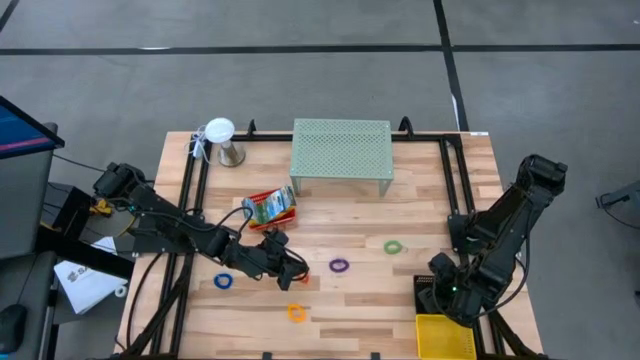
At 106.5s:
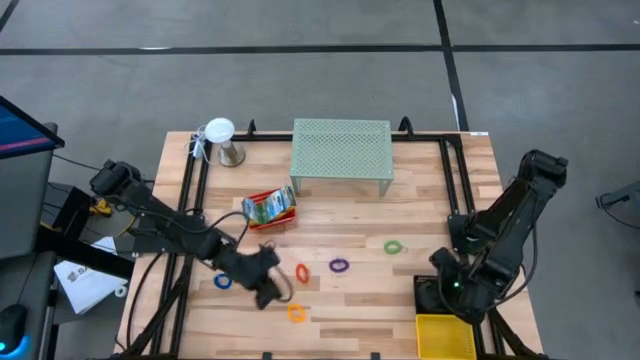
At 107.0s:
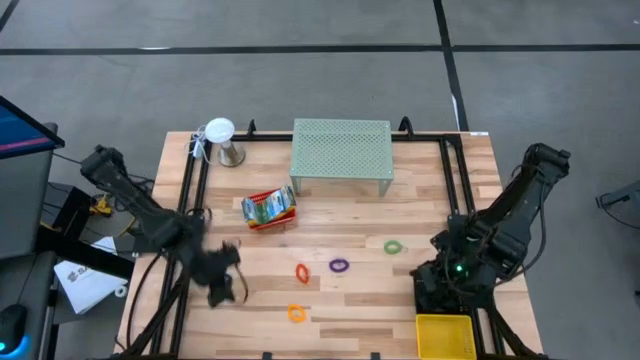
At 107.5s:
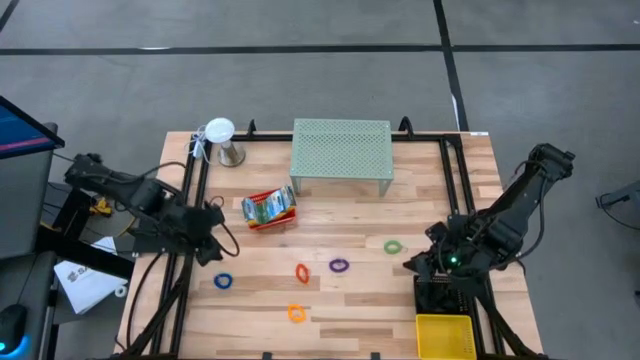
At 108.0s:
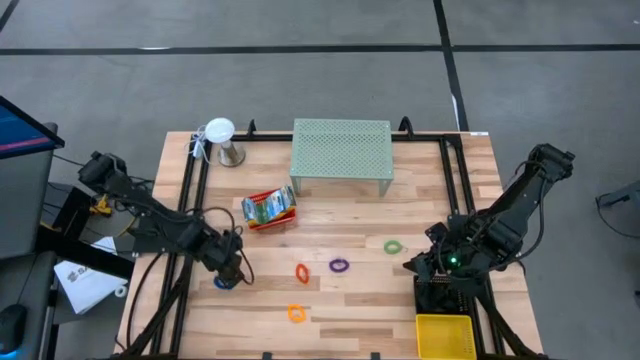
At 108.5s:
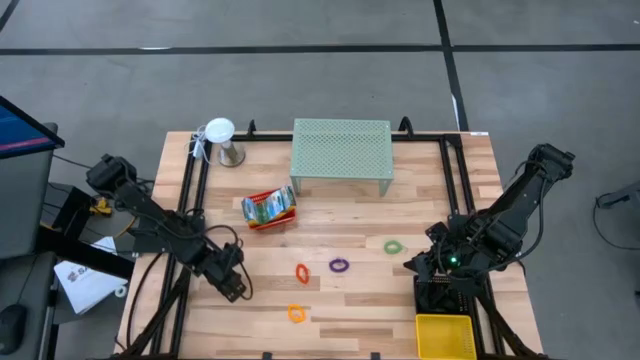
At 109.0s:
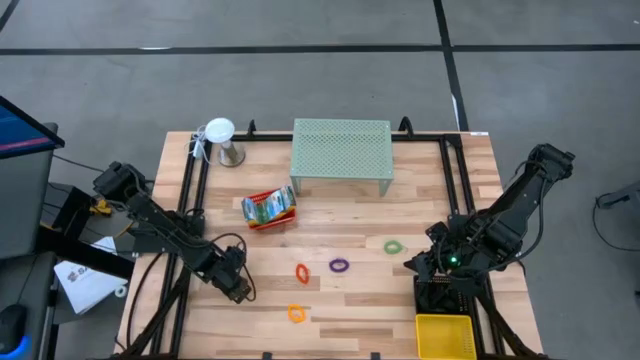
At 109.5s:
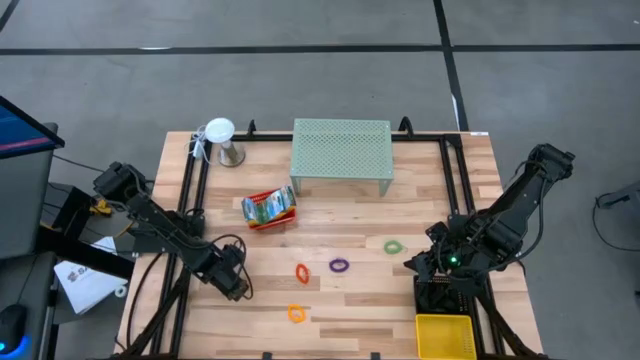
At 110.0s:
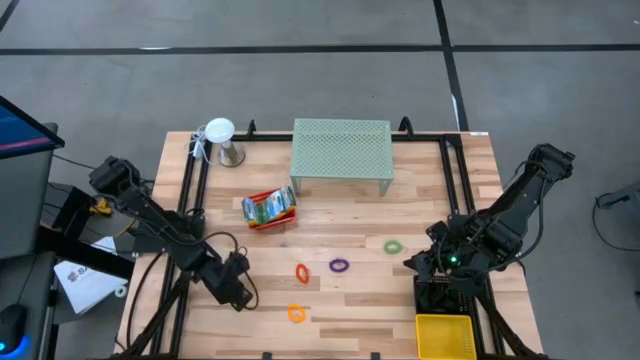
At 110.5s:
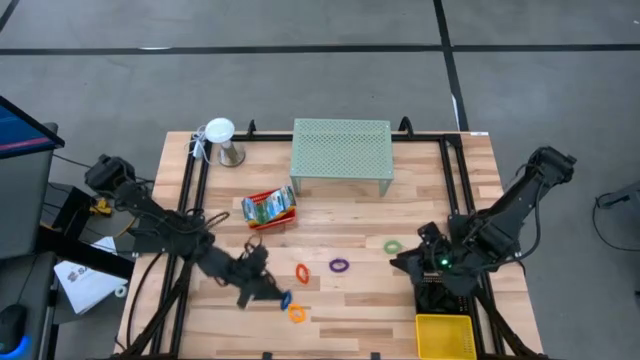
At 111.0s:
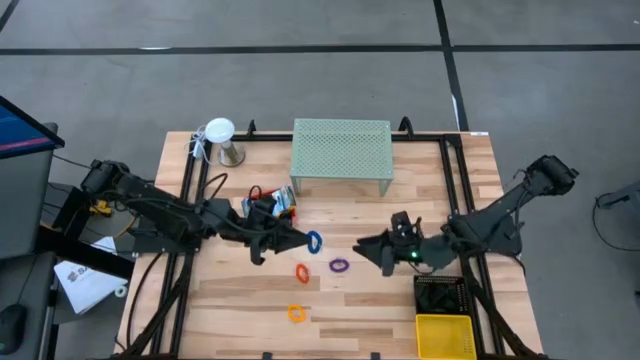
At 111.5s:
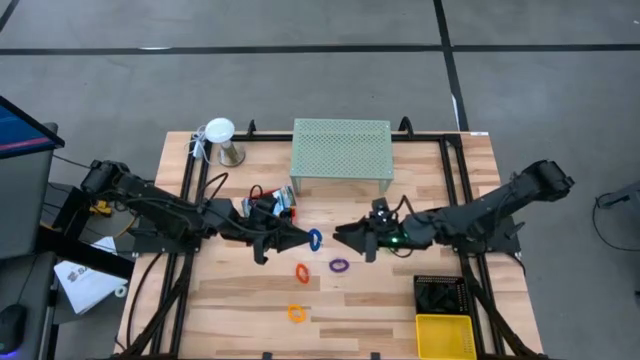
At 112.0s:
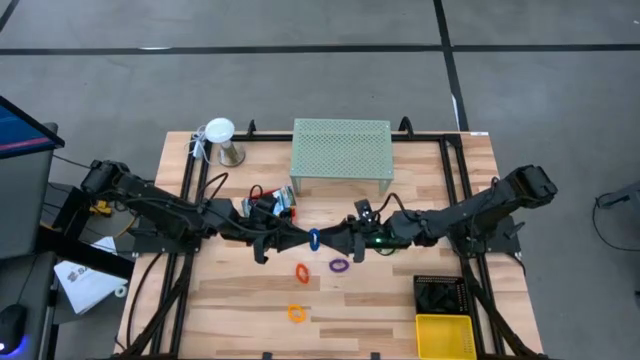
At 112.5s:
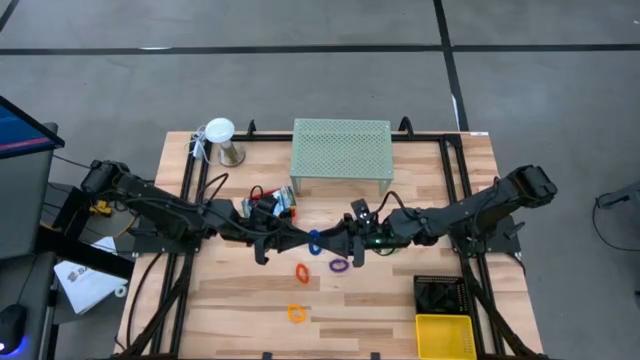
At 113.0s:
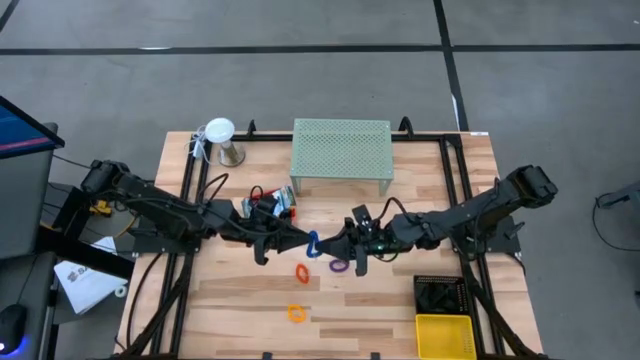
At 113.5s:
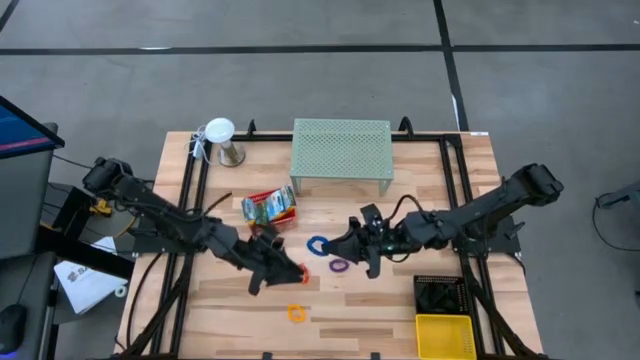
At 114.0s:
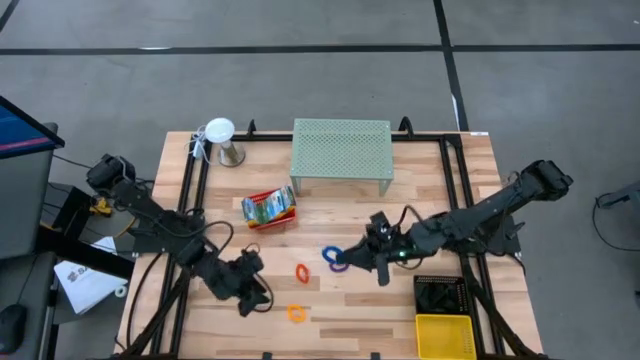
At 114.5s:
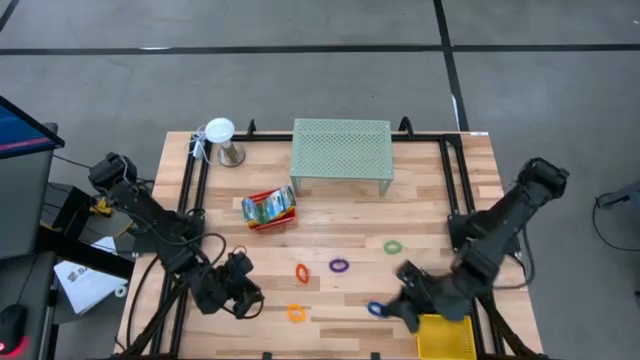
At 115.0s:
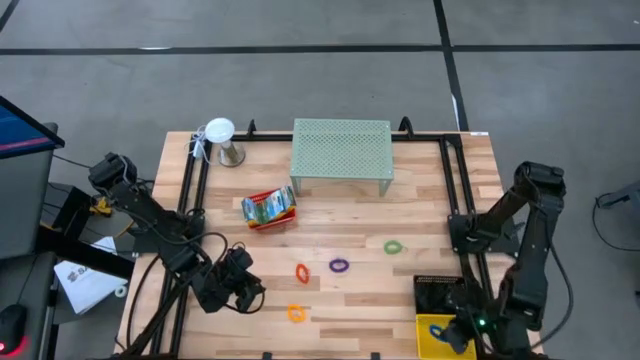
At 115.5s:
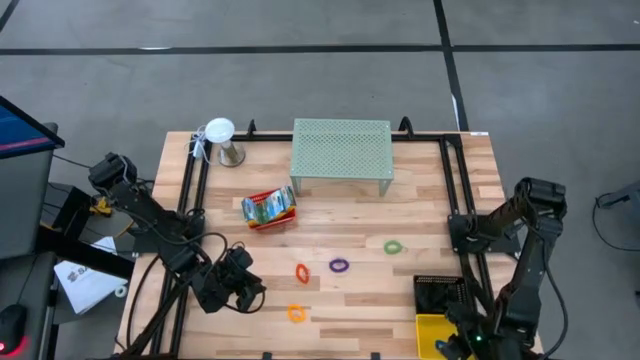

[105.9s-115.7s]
Task: Pick & Place Office Desk Supplies
Put the blue spring keychain into the yellow bin

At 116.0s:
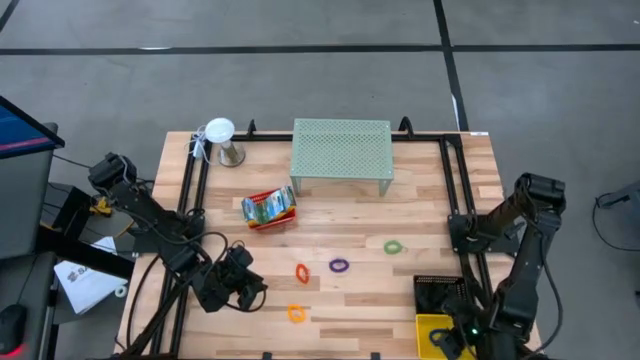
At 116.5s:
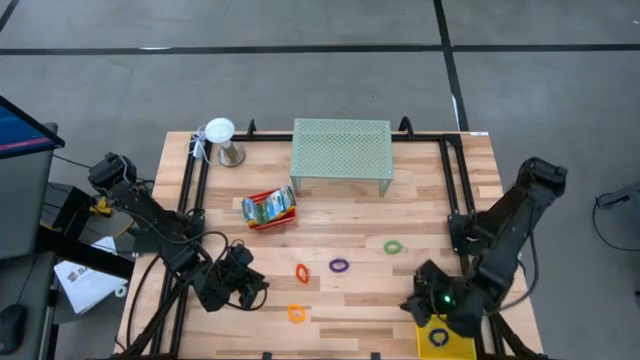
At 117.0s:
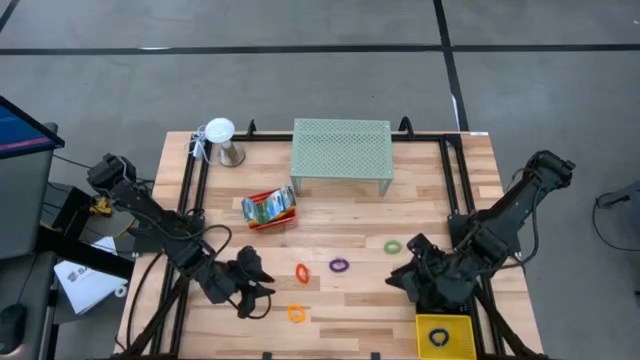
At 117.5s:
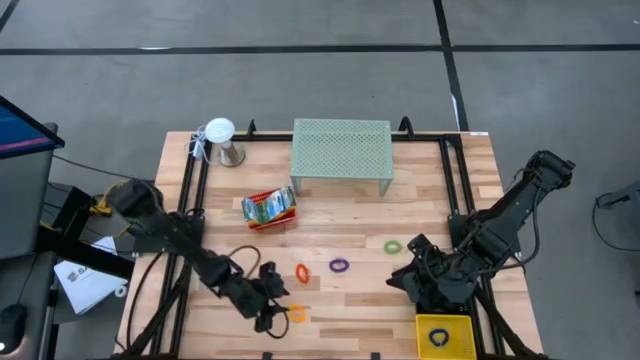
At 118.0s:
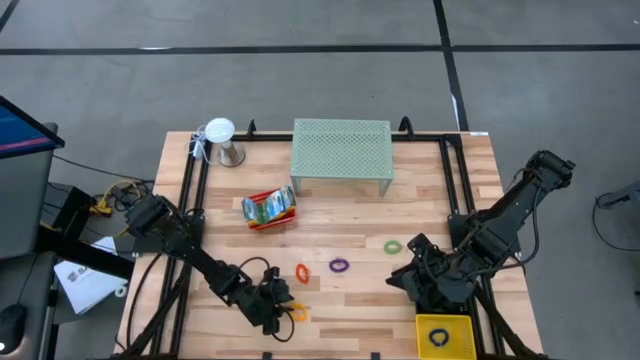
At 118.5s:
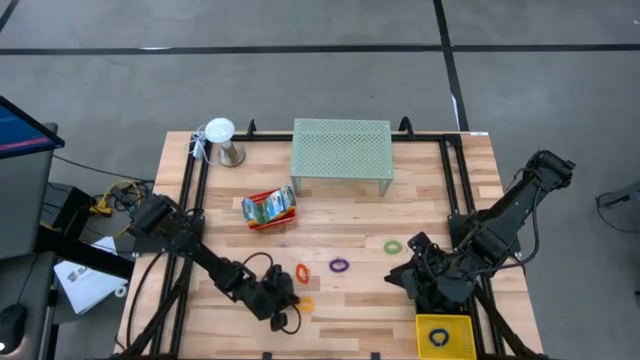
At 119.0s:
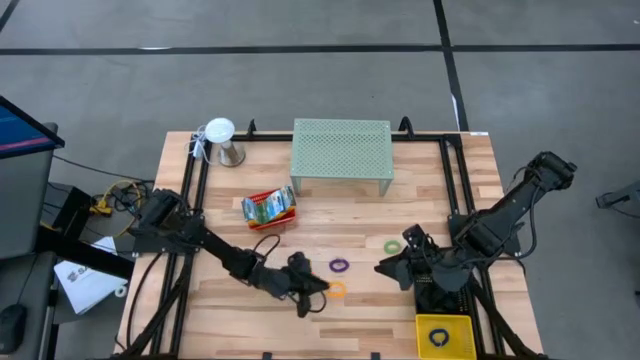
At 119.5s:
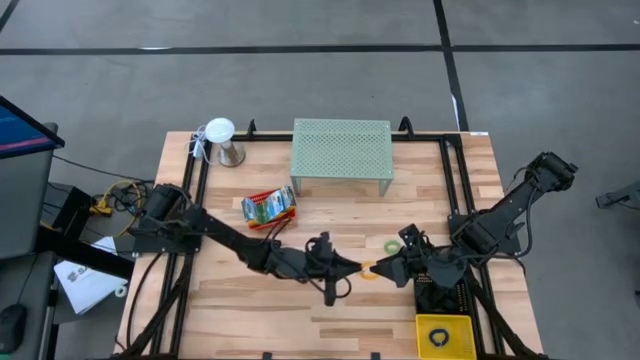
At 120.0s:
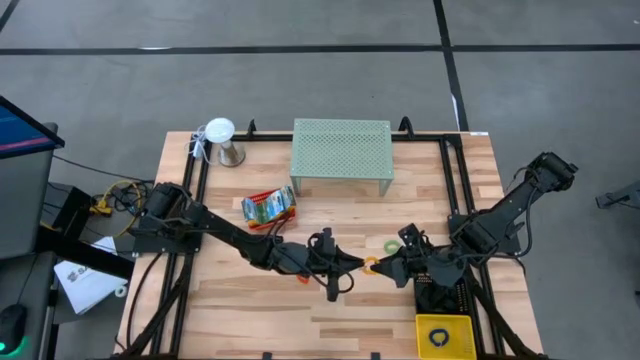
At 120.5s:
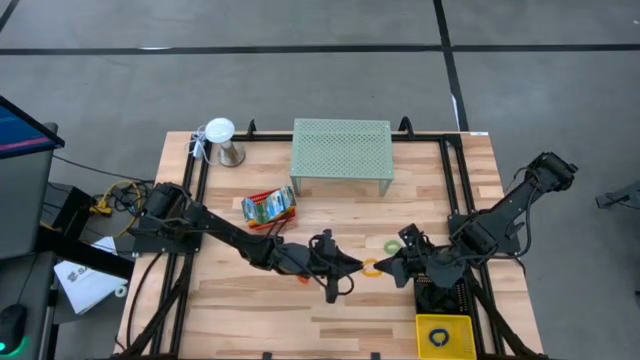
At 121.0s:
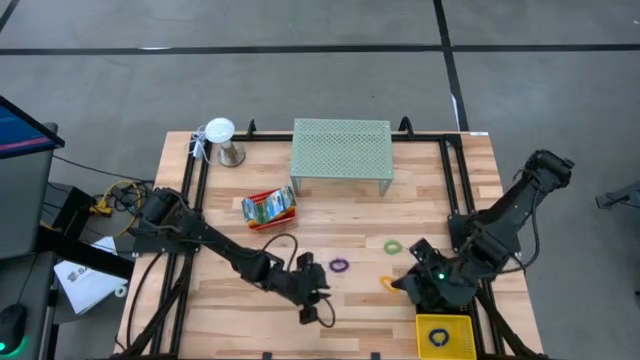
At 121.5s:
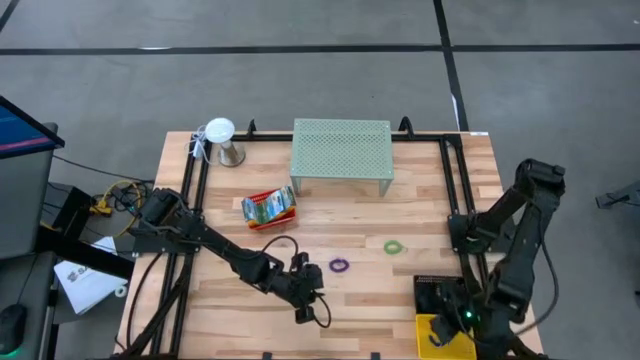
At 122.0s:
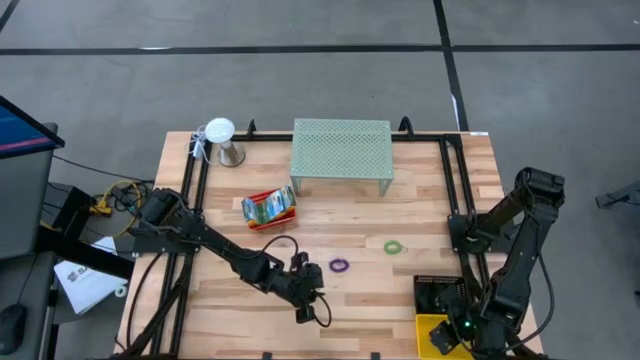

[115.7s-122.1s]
Put the yellow spring keychain into the yellow bin

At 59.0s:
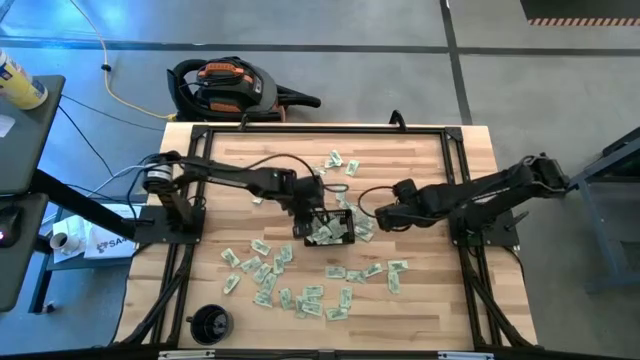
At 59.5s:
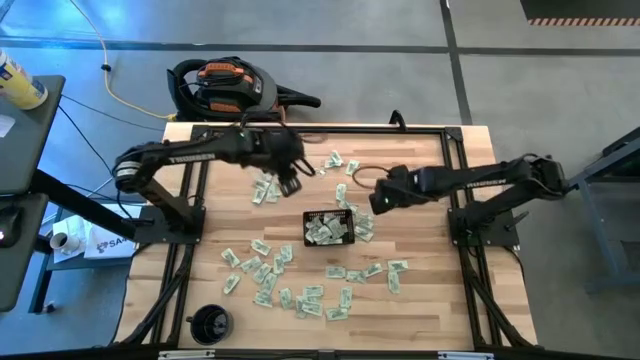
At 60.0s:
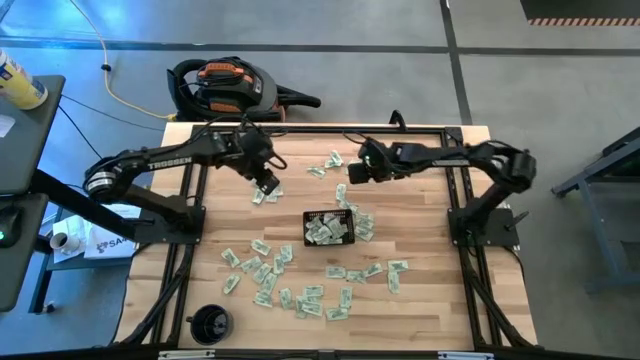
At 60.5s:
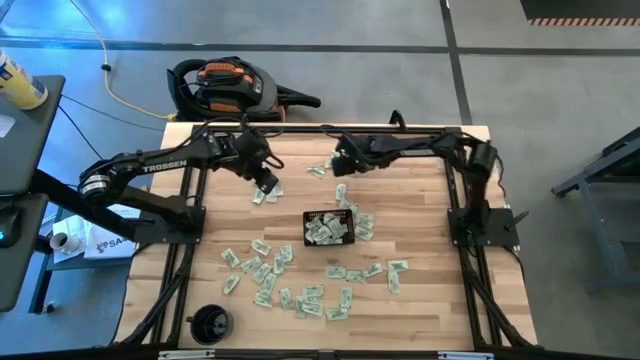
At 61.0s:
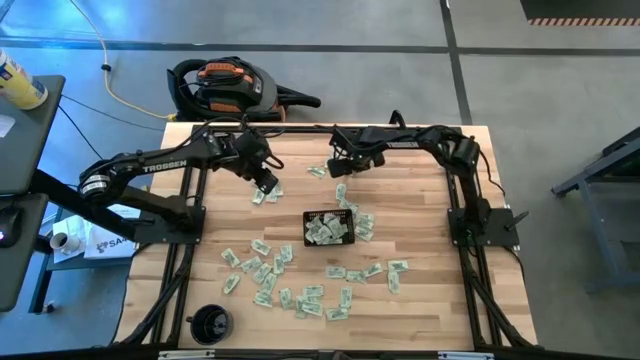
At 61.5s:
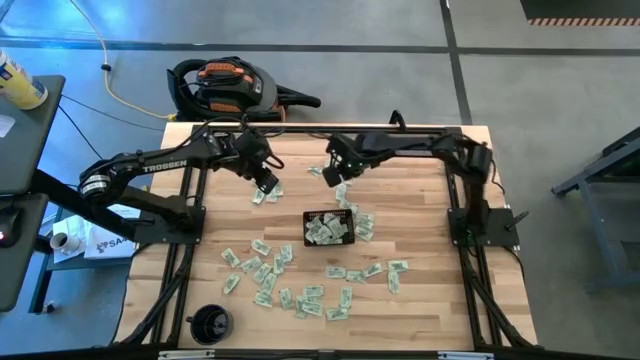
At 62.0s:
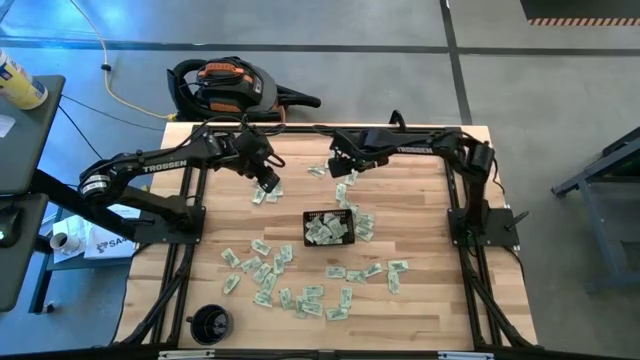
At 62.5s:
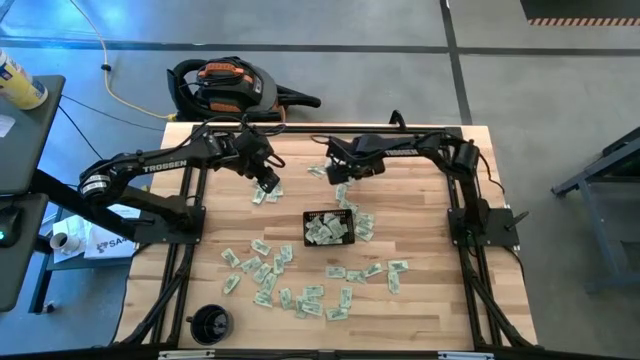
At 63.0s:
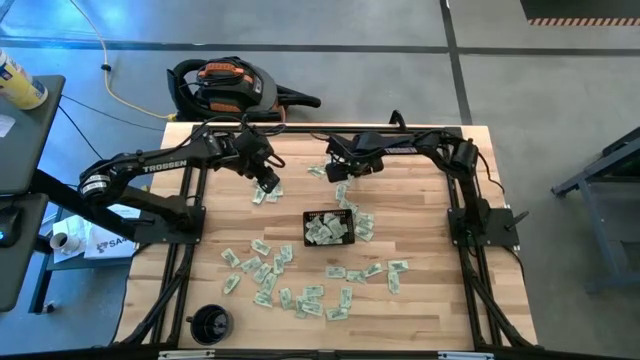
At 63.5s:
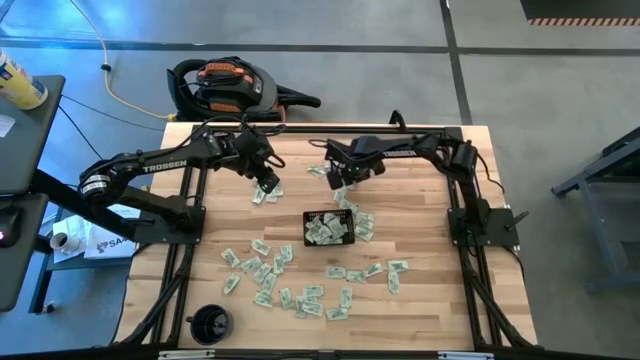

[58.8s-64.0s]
Task: Pick and place Stevia / Truvia into bins
Put the green stevia packet into the black basket
